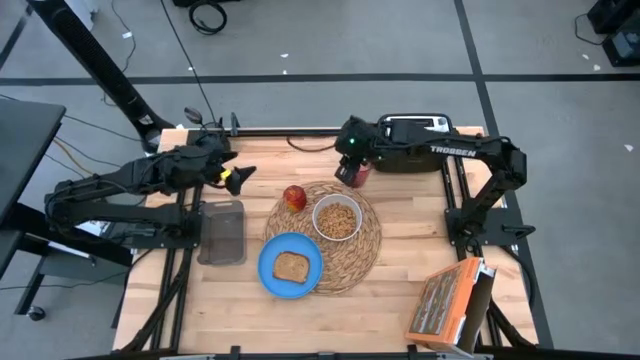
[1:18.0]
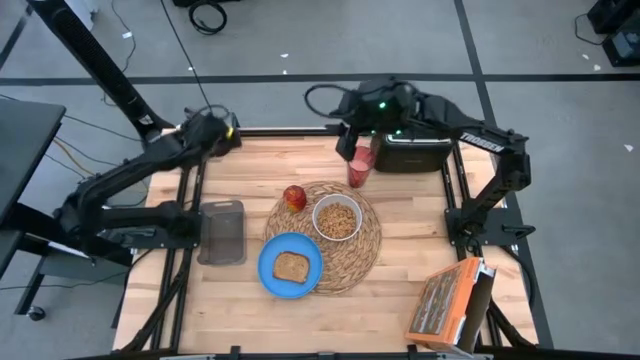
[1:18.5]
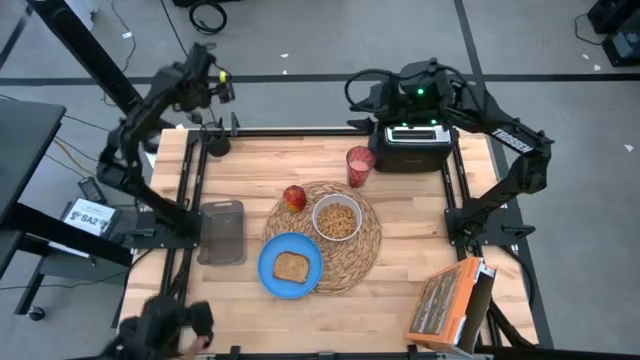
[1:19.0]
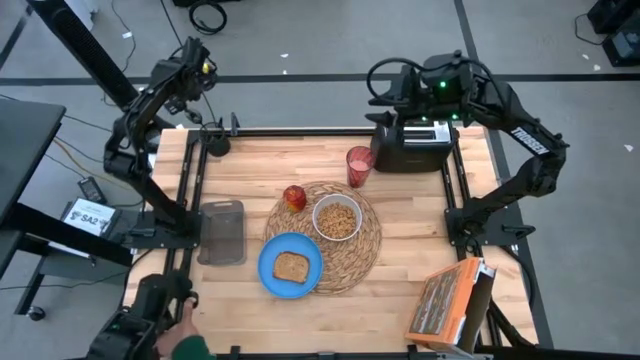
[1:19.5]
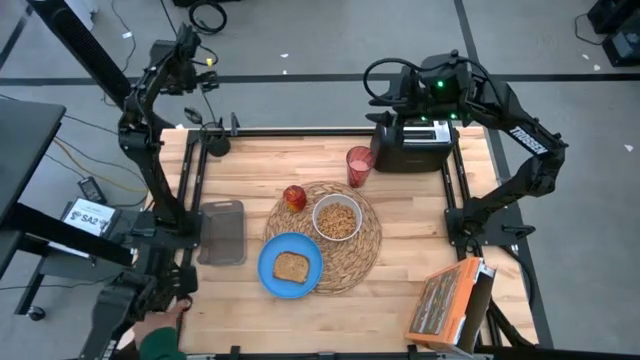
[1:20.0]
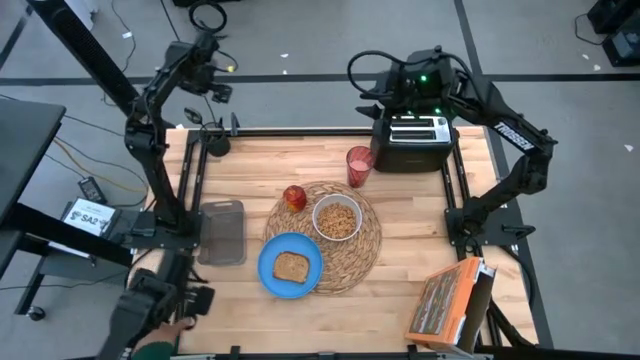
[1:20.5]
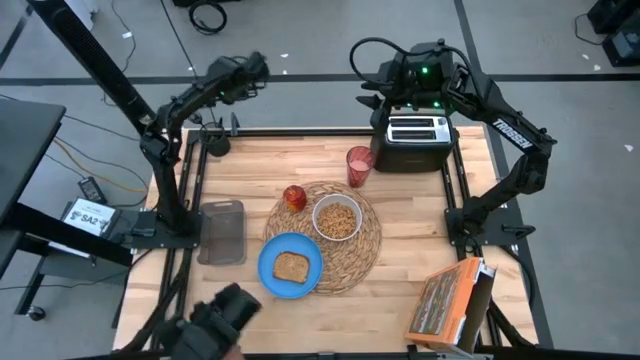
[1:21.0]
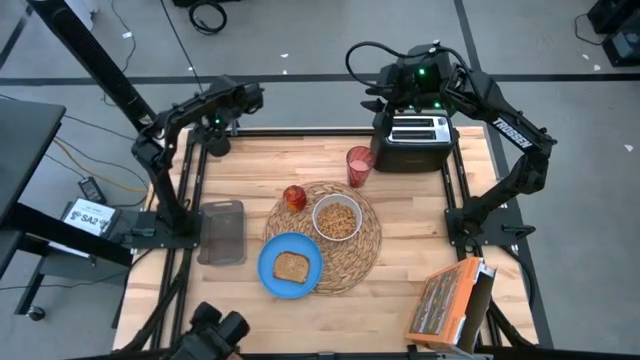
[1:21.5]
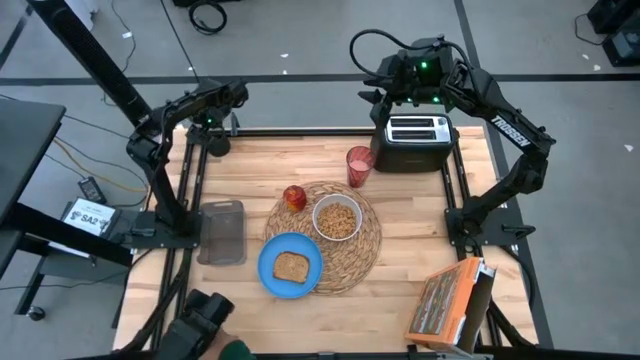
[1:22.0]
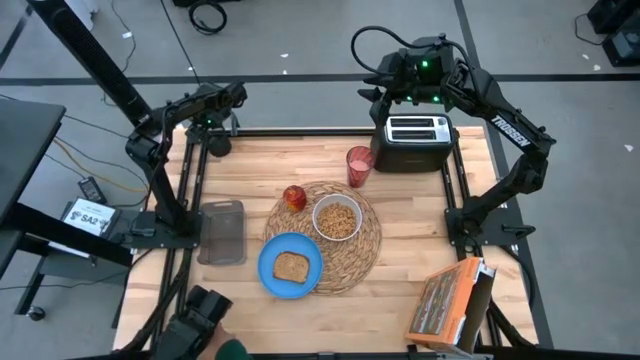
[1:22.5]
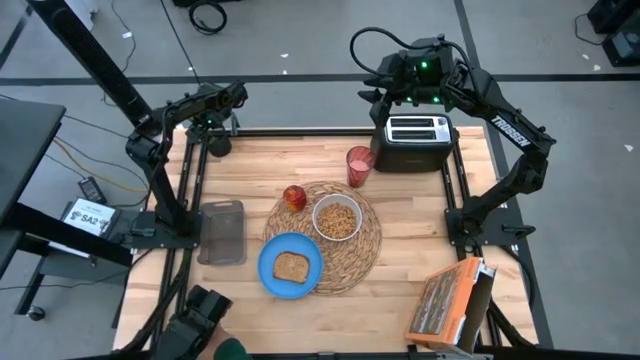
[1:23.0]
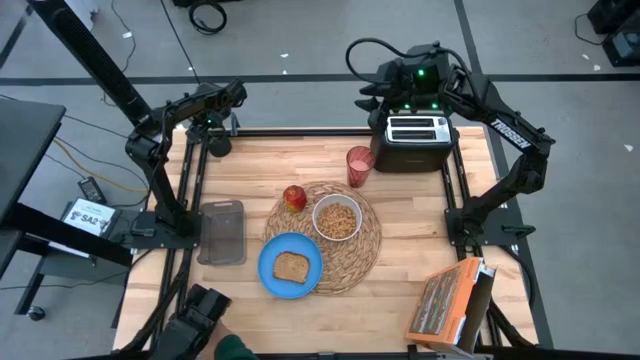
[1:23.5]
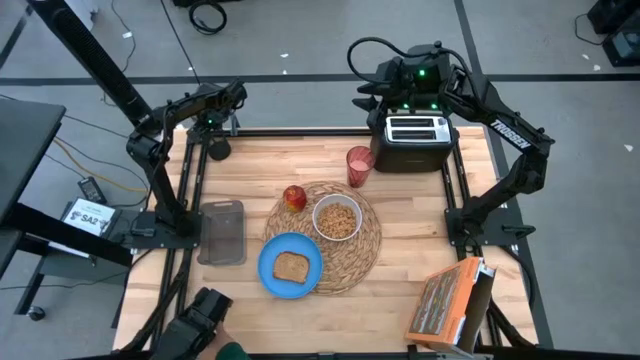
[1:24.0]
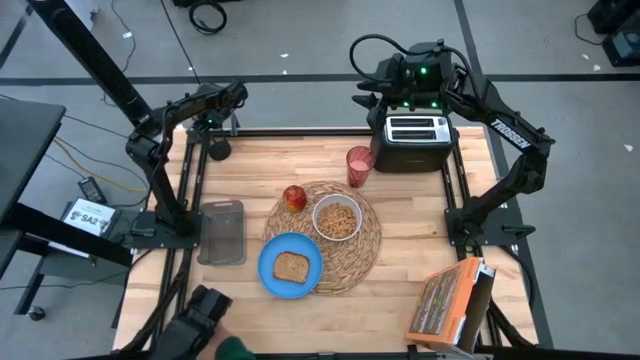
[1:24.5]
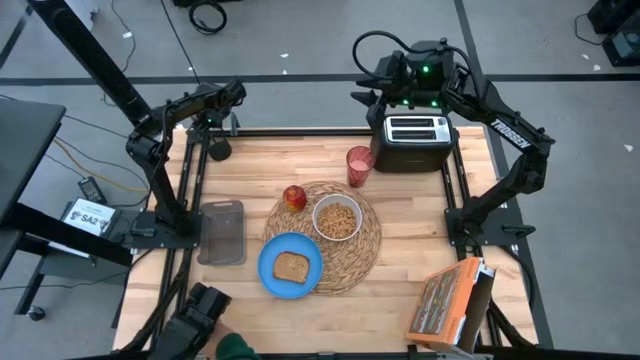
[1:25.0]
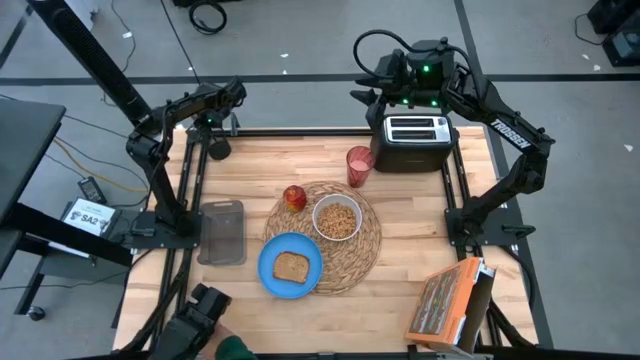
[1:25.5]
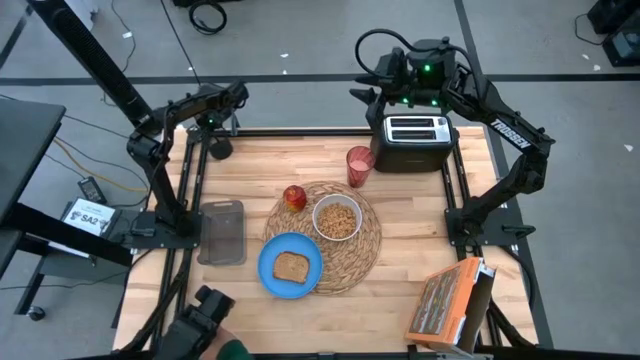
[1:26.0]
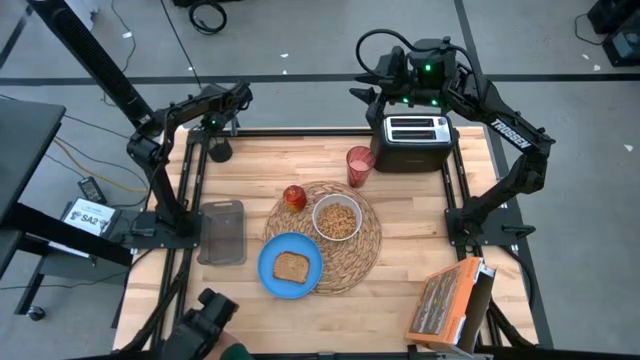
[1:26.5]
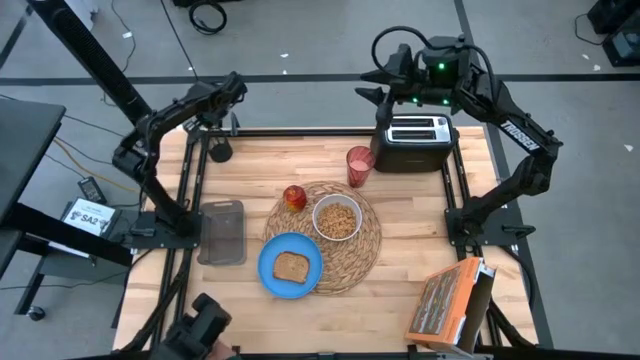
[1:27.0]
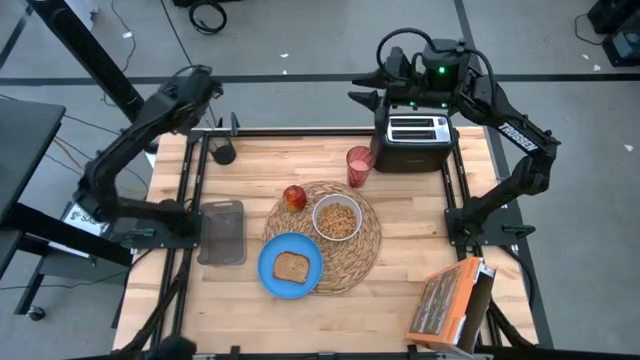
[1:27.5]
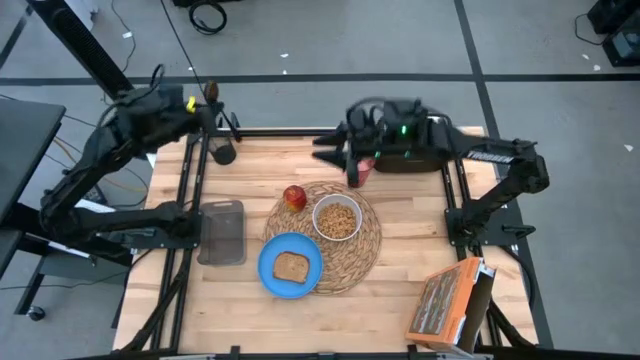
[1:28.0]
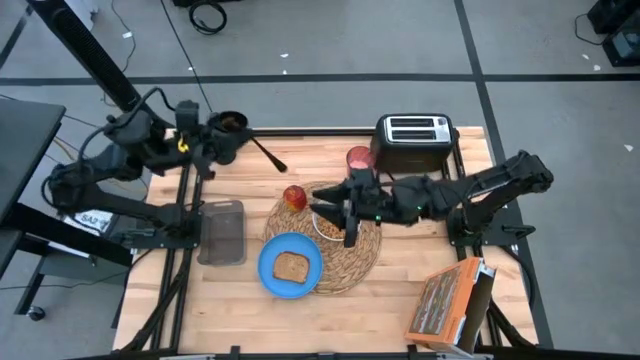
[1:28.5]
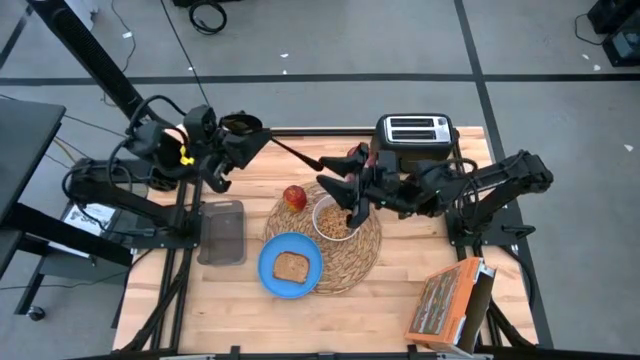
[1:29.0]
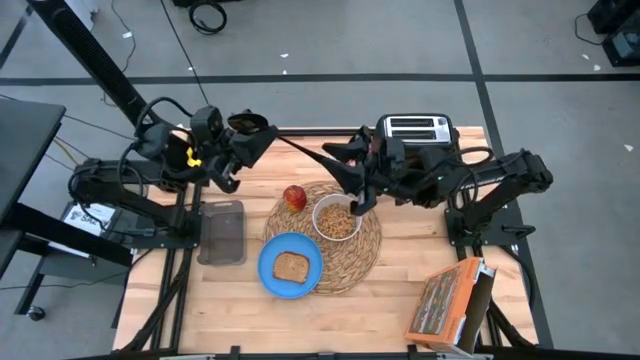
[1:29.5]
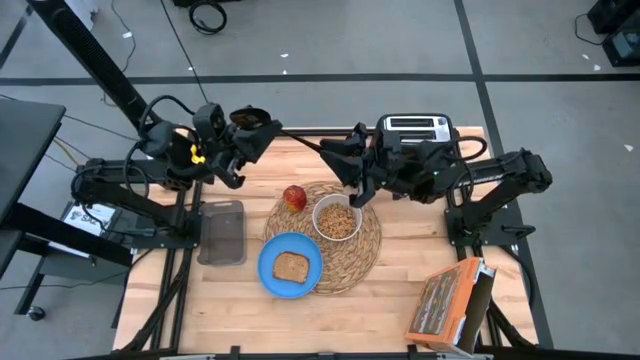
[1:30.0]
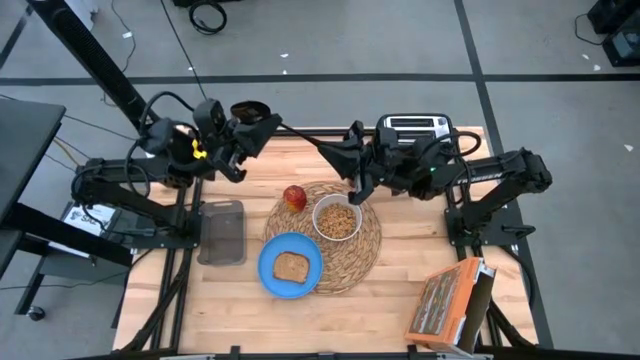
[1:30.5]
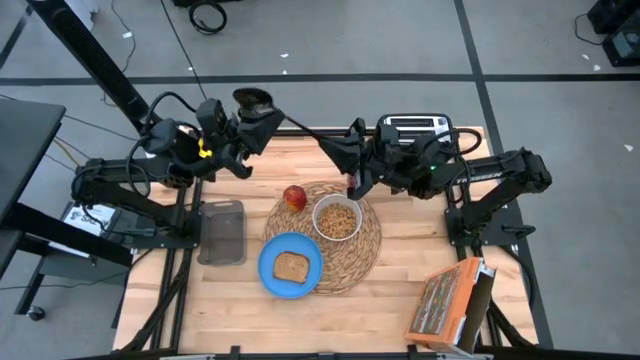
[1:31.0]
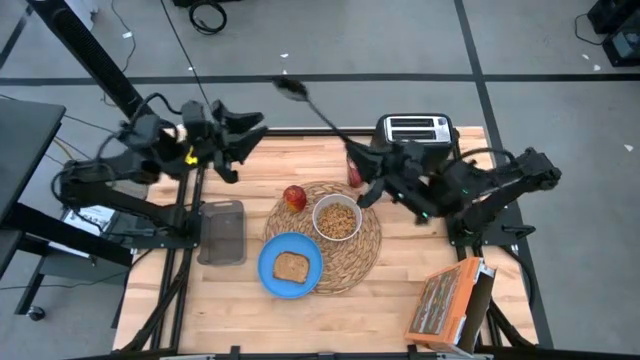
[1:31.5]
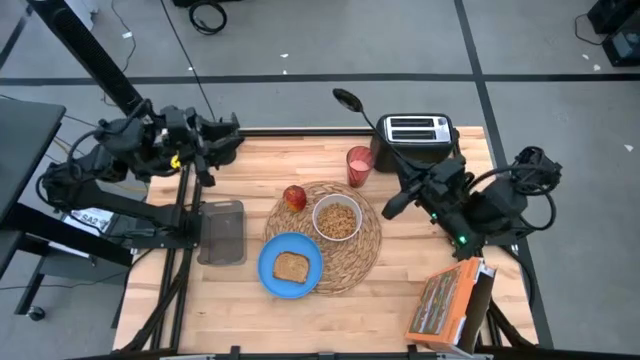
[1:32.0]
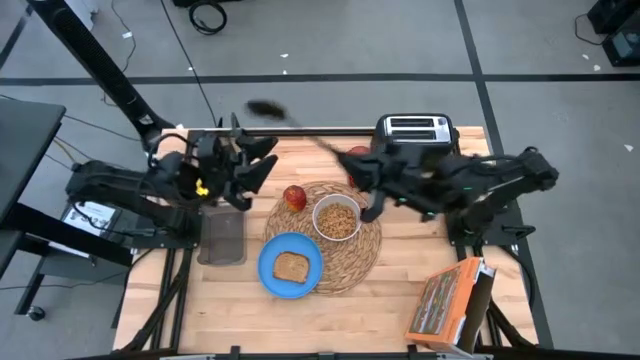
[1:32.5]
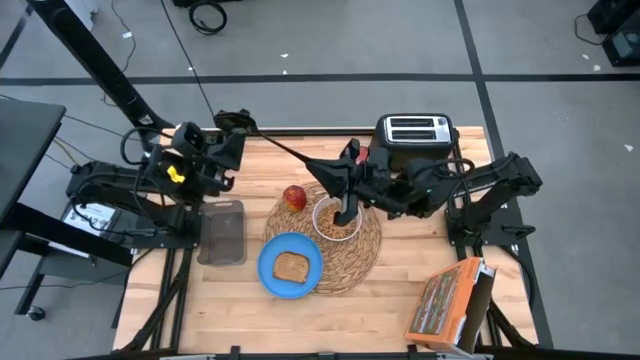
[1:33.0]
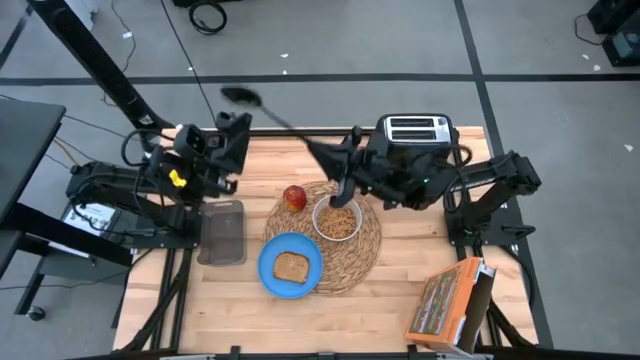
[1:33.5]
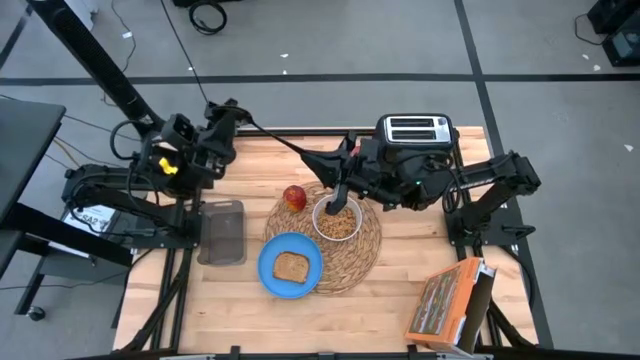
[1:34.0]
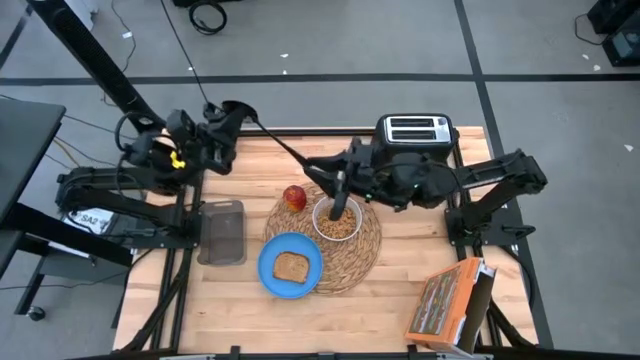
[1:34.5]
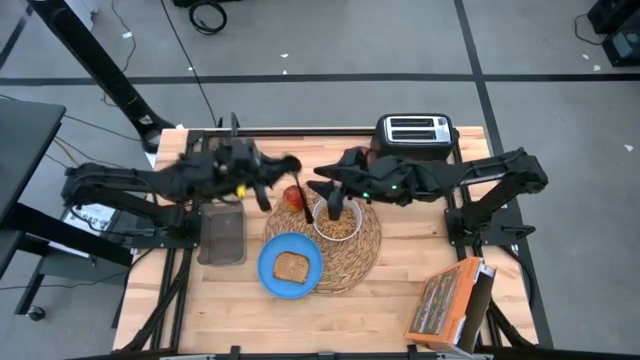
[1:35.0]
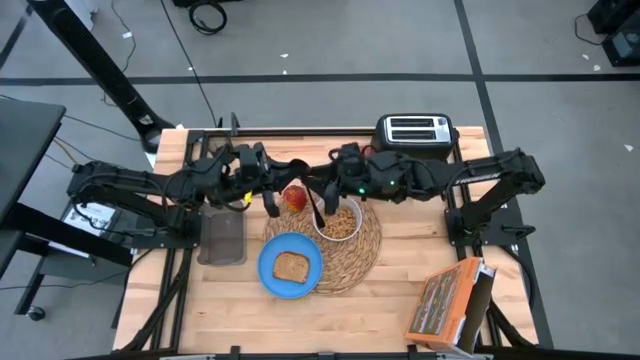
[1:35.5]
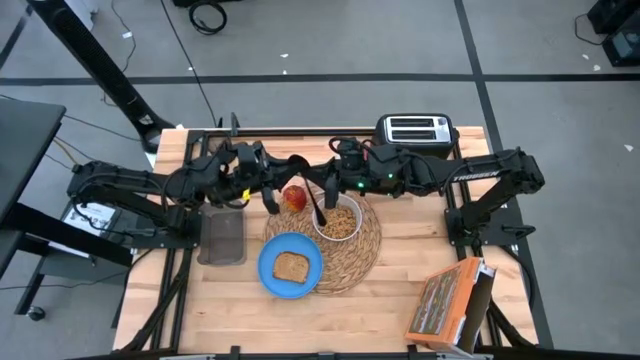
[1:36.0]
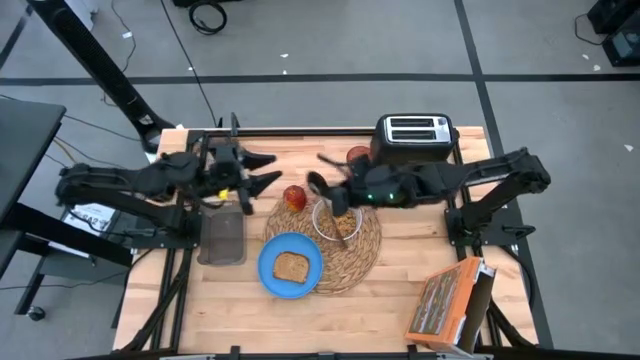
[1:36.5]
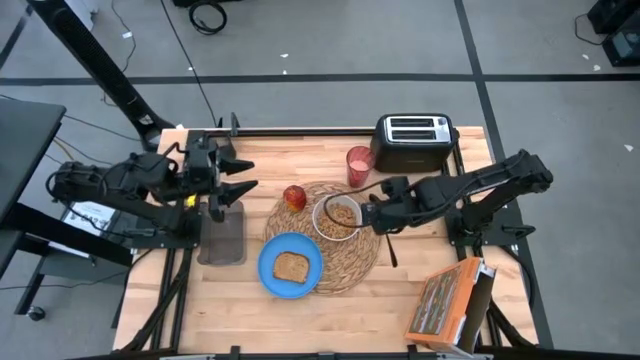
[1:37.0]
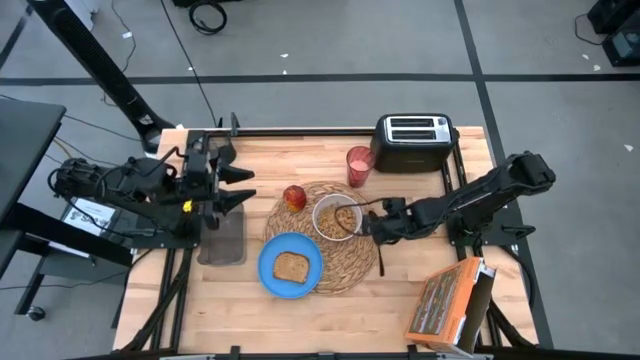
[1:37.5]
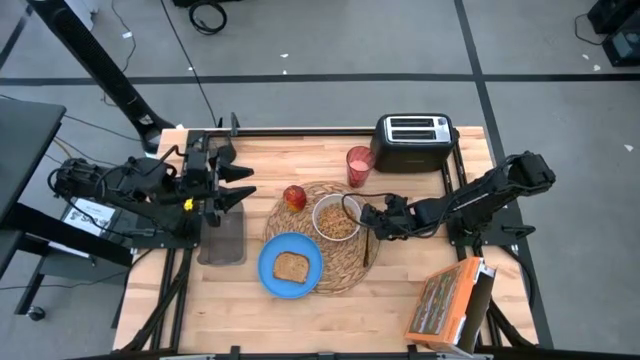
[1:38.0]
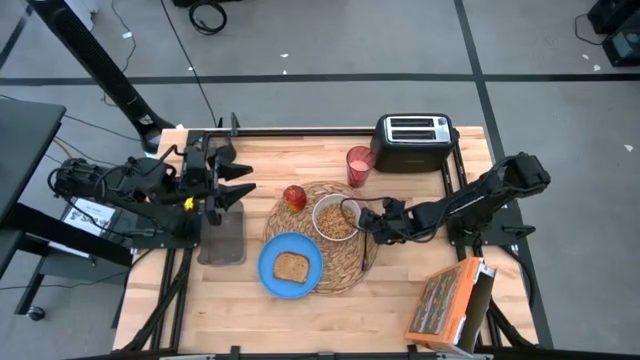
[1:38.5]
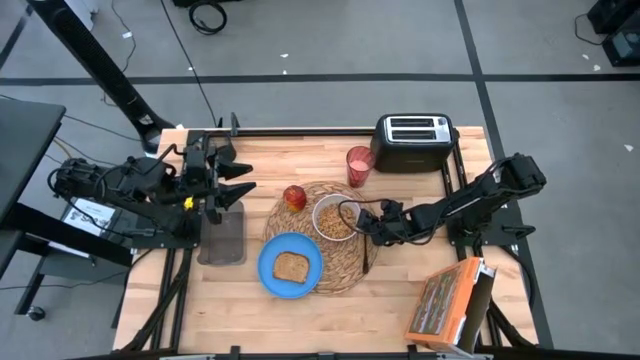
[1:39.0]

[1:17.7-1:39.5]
Task: Arrange a breakfast setting
Put the black spoon on the brown table mat
